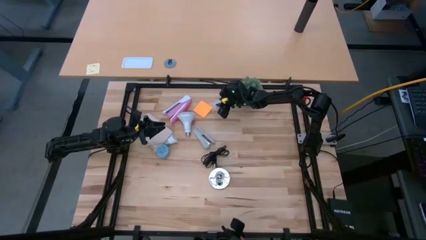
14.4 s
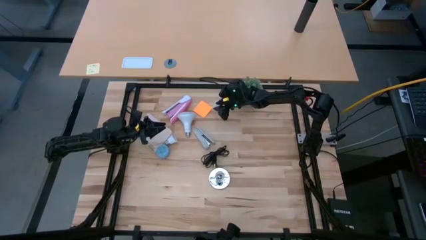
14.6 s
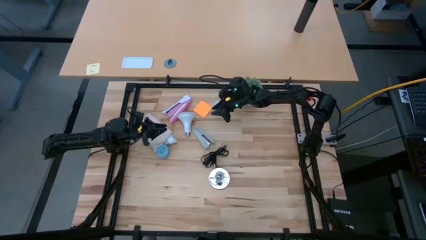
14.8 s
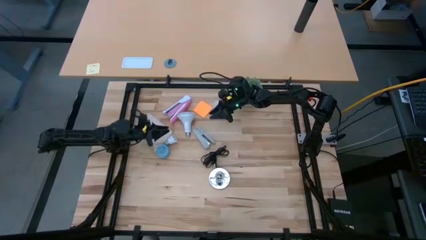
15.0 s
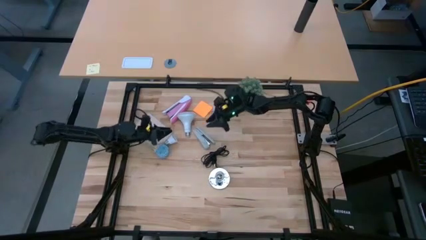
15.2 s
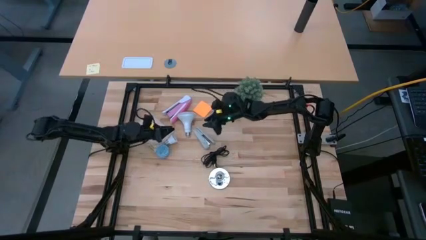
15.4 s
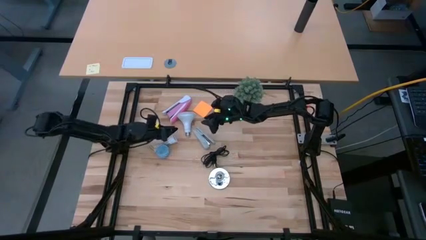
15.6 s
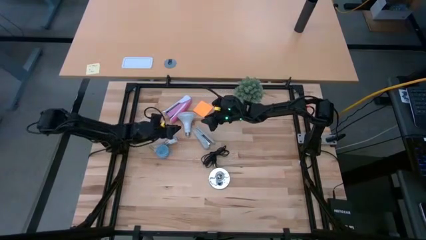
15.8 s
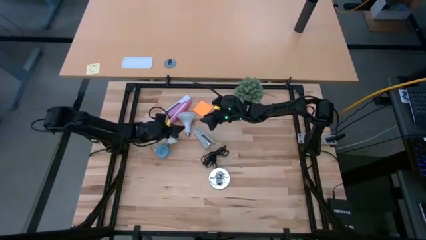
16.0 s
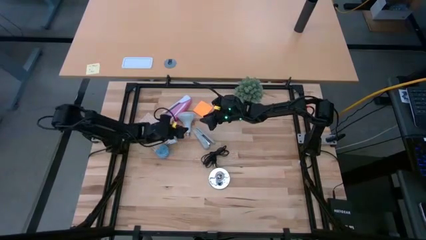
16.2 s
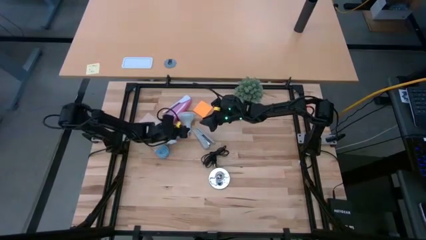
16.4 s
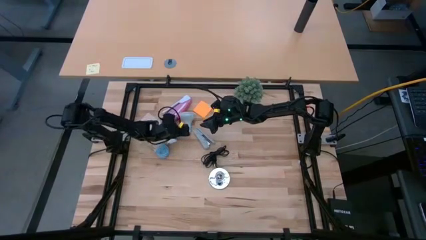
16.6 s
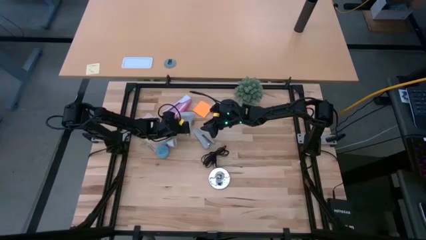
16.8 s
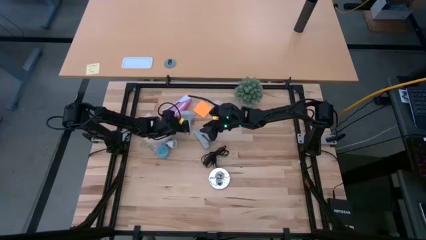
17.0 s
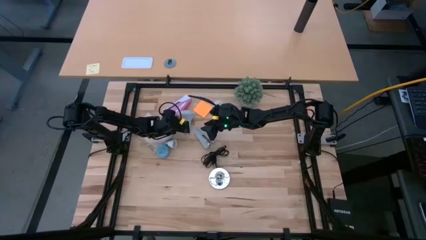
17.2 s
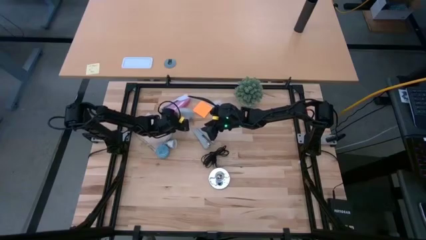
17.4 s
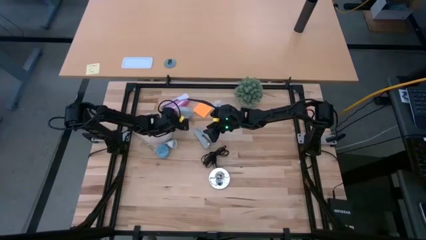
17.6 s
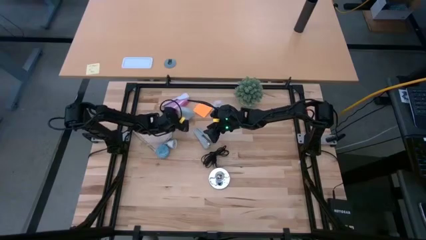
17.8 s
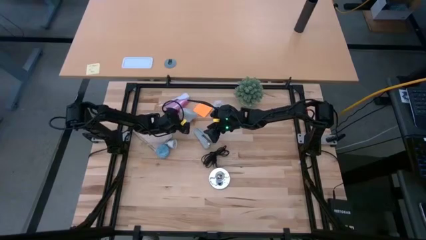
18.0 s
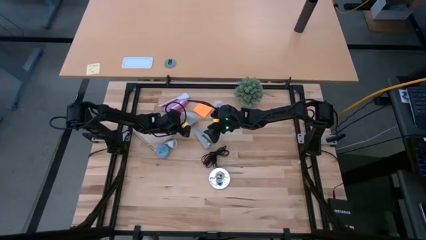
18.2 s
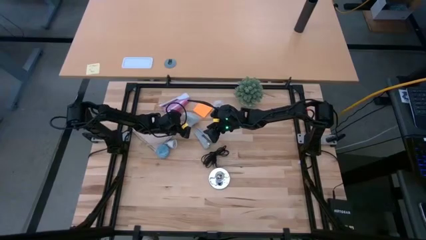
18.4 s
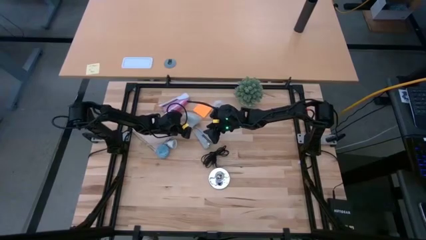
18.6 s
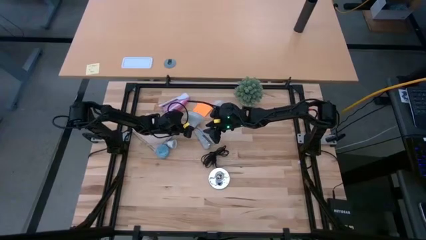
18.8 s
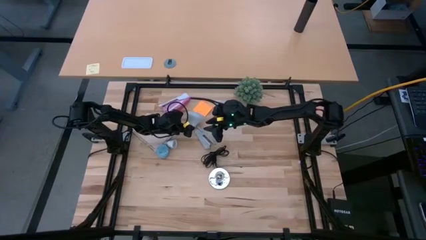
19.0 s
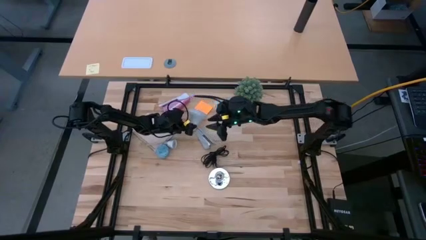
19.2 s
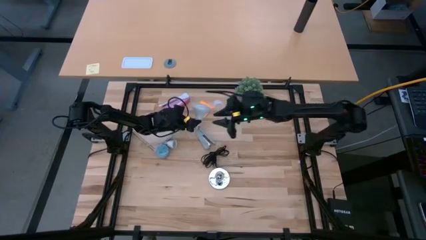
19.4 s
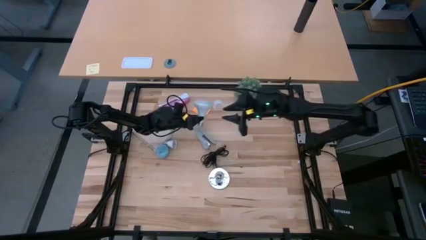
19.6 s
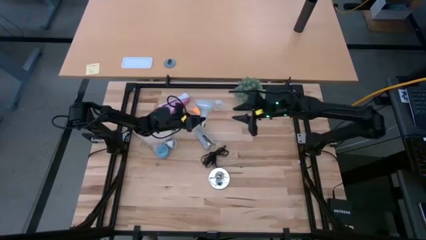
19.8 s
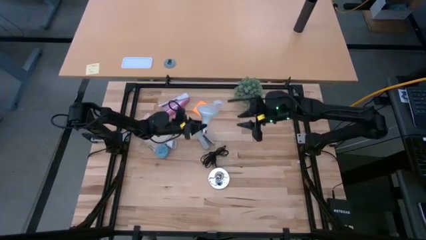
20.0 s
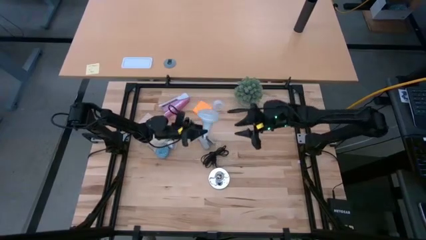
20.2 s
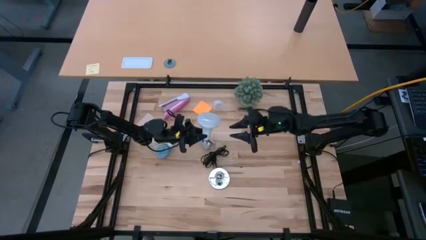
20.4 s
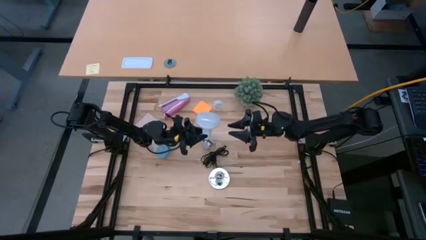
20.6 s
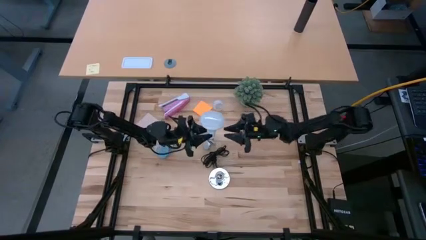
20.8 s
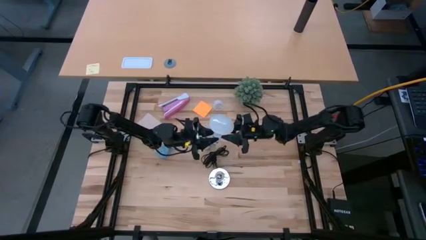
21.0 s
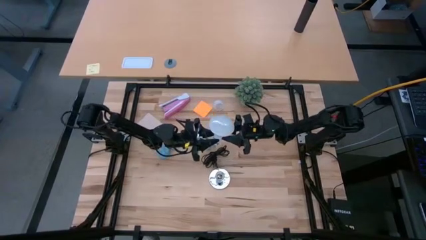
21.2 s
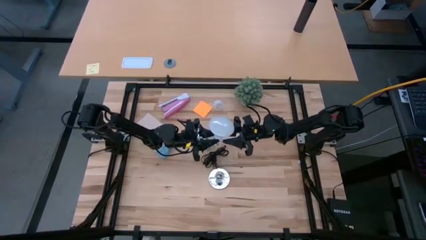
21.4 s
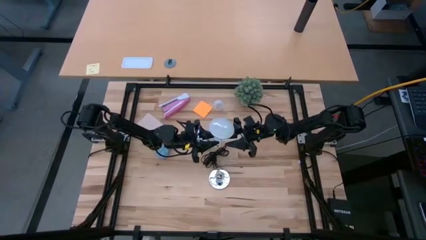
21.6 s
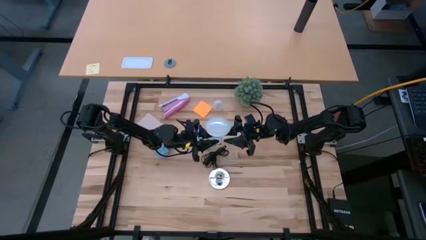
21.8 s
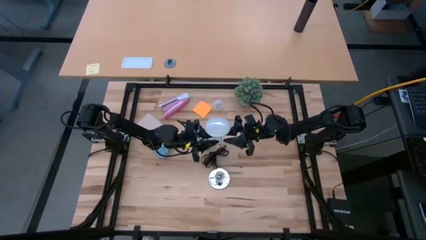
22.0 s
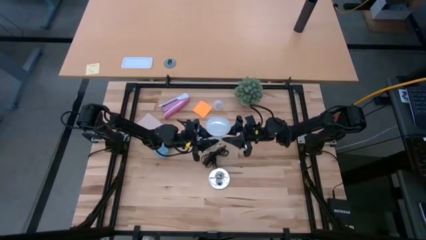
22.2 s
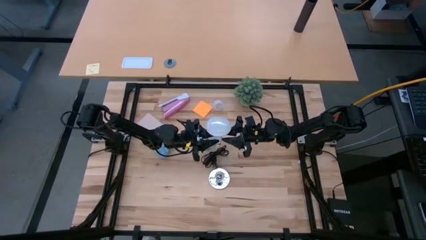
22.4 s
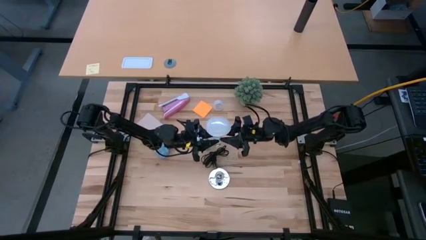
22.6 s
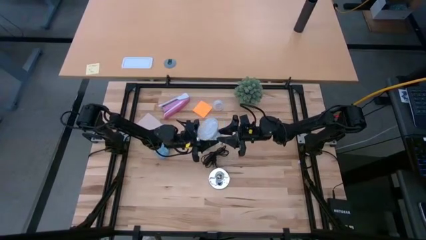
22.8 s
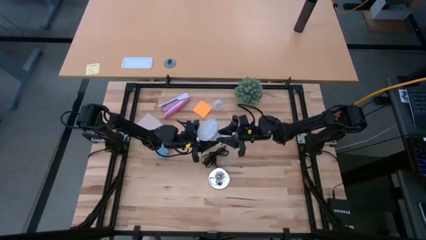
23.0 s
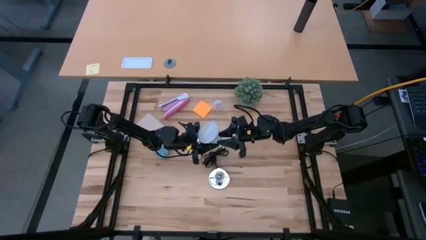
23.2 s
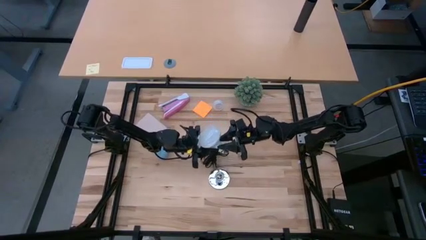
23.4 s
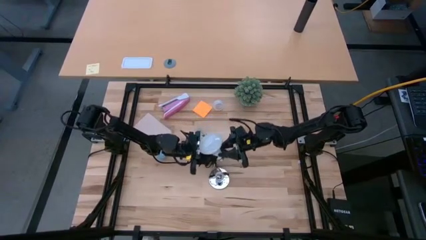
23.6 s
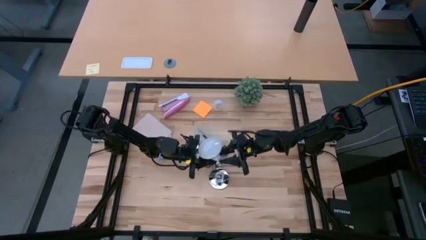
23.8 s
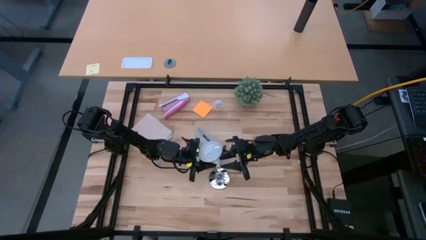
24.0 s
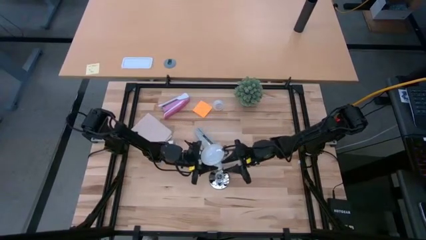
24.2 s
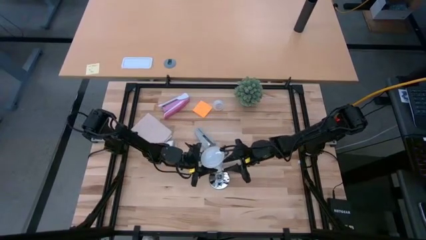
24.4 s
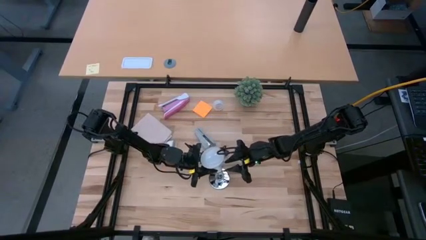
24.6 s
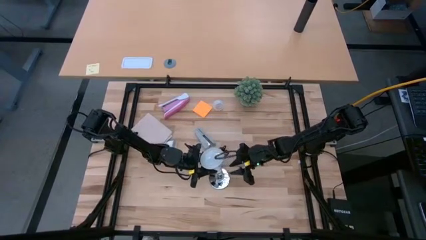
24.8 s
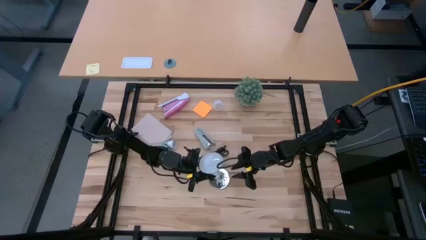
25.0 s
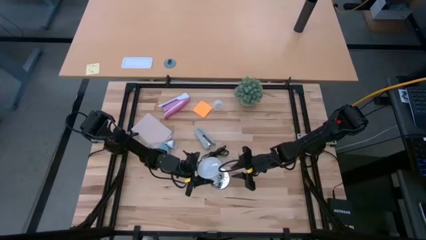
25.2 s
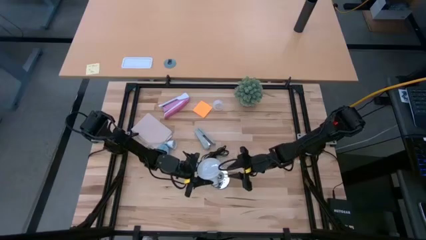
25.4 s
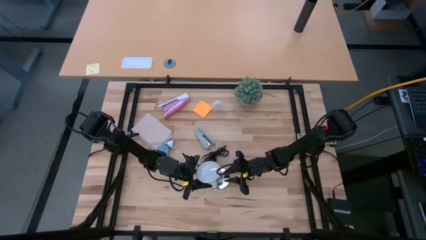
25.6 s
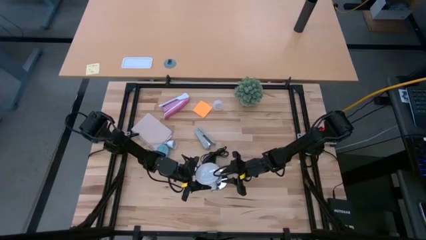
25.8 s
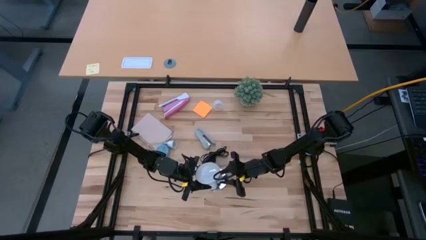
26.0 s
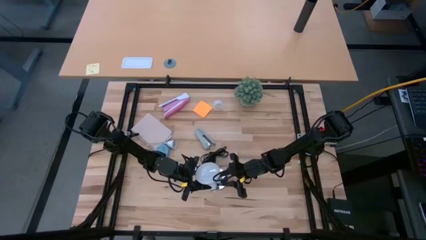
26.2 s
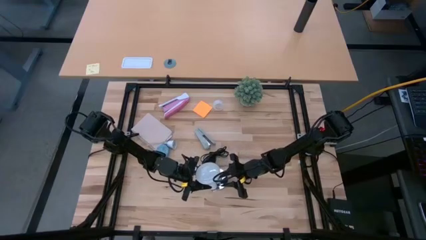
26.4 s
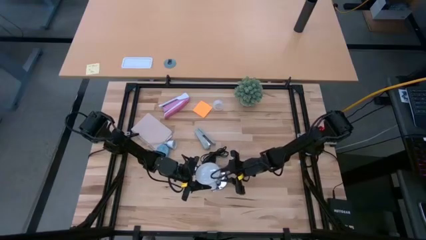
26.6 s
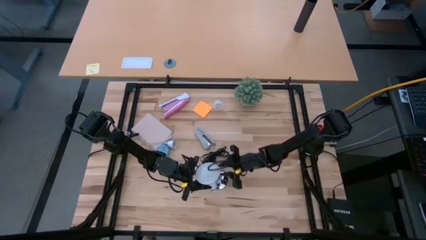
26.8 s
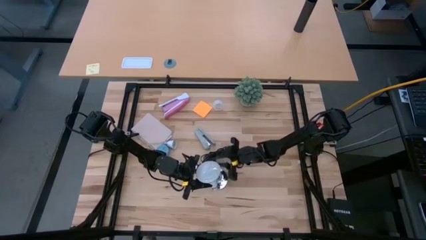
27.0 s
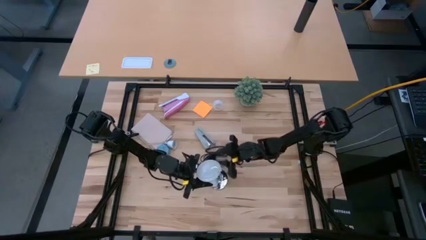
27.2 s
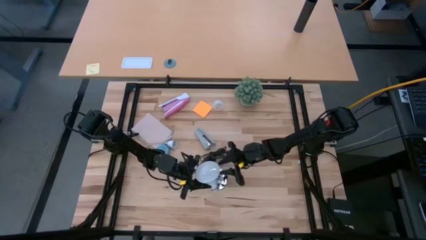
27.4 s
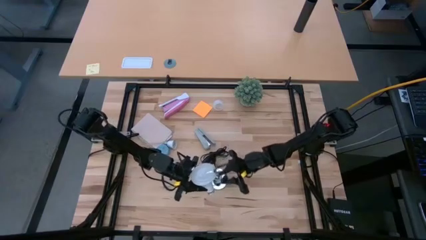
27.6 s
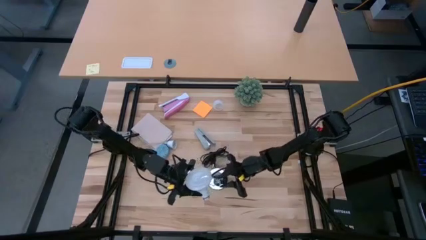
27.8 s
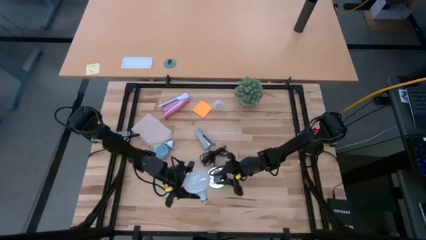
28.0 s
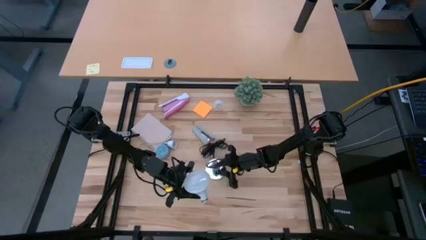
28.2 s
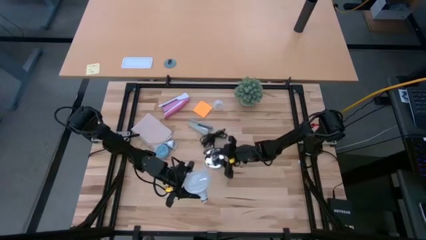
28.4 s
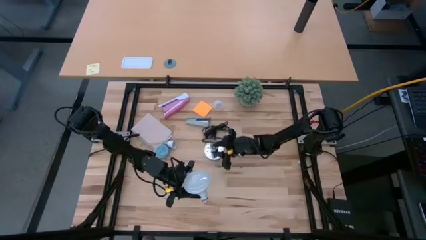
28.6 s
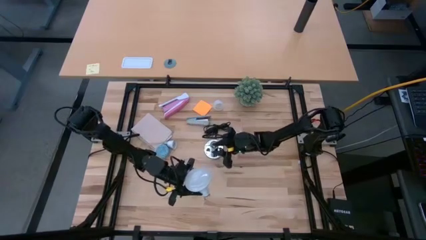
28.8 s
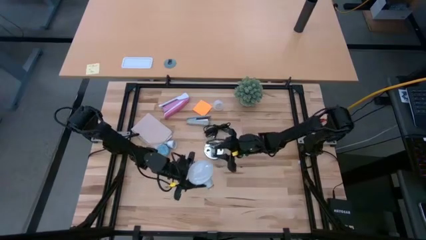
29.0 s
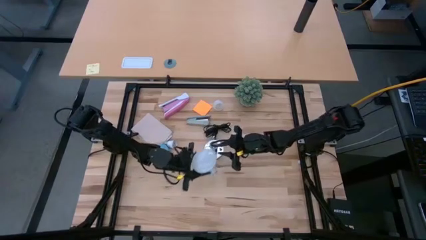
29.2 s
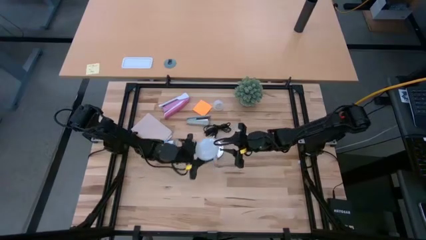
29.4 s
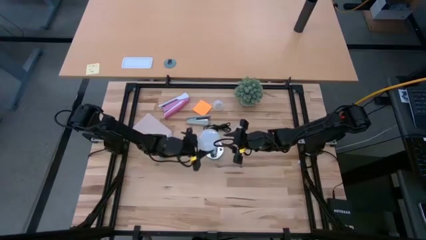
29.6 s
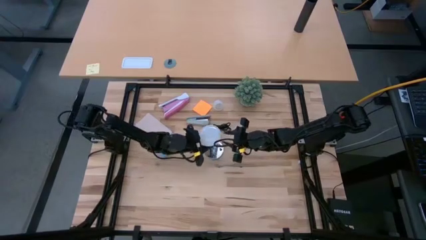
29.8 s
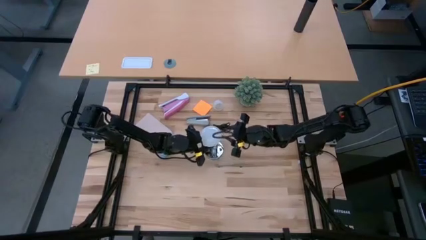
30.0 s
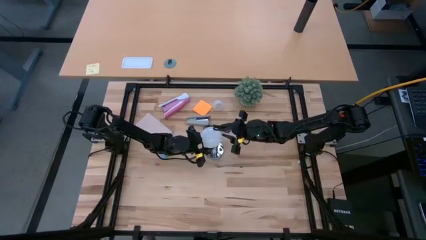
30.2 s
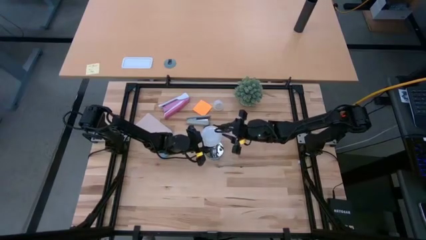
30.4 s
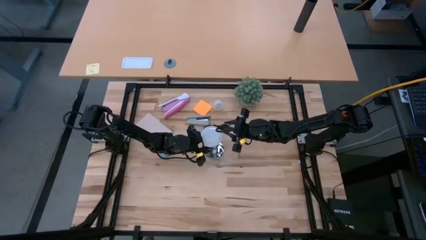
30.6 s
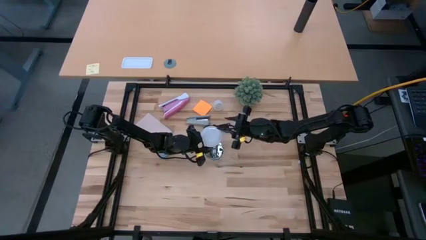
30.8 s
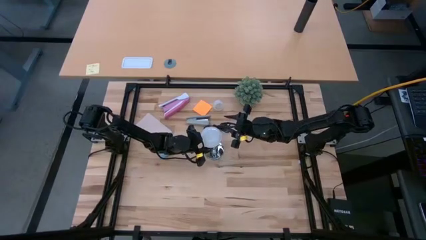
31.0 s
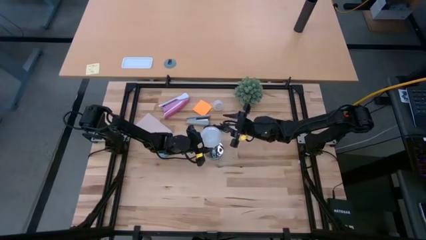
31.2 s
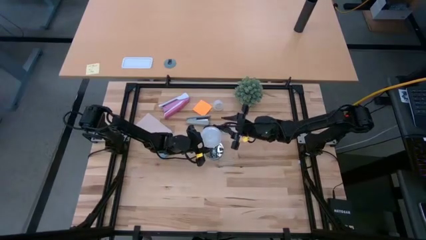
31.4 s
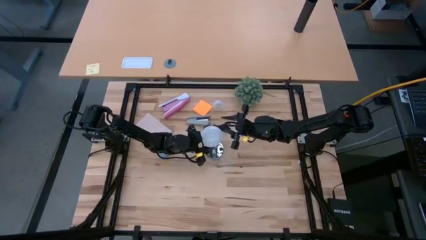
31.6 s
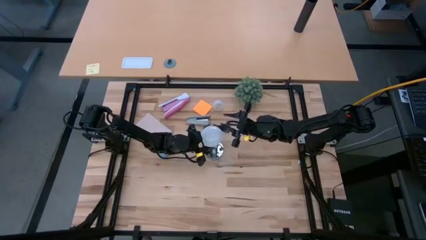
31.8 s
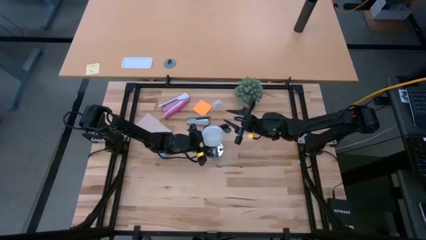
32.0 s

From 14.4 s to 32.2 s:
Task: Screw lightbulb
Insert the lightbulb on the lamp
